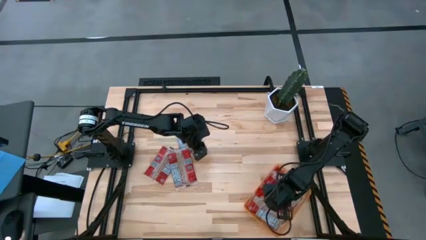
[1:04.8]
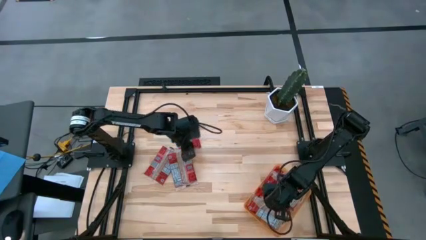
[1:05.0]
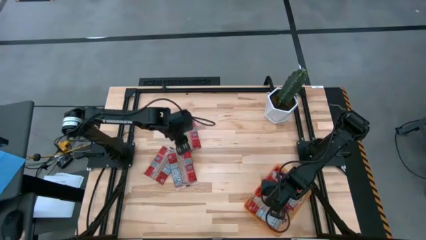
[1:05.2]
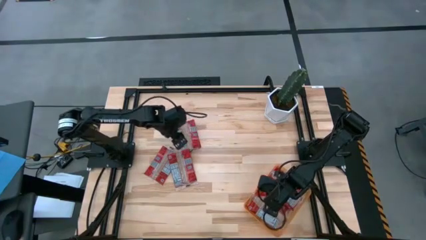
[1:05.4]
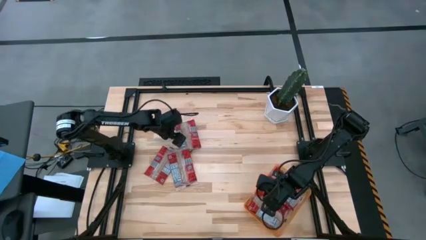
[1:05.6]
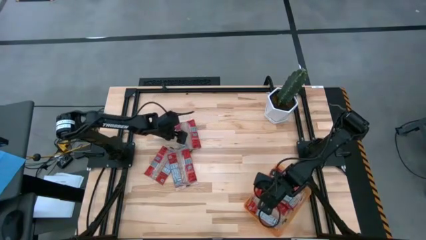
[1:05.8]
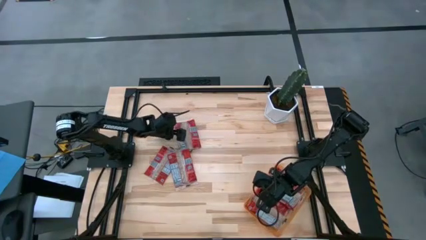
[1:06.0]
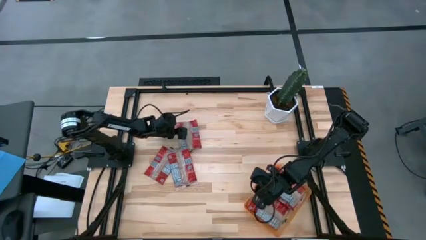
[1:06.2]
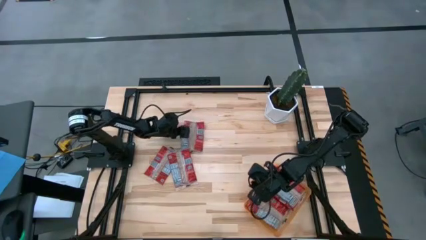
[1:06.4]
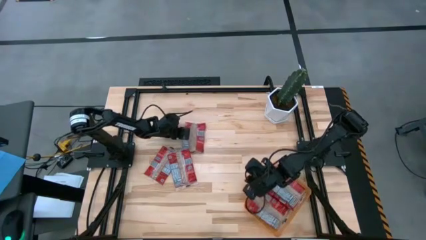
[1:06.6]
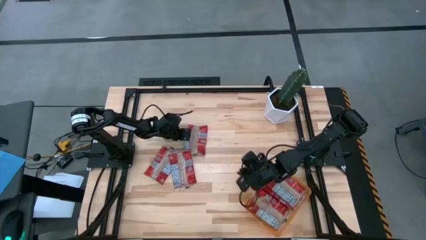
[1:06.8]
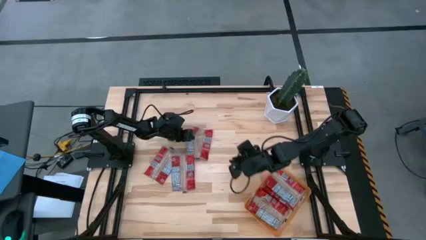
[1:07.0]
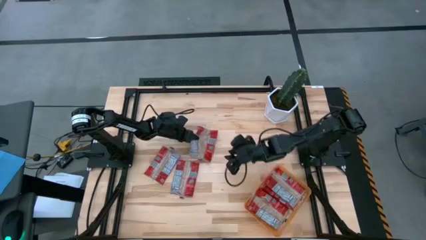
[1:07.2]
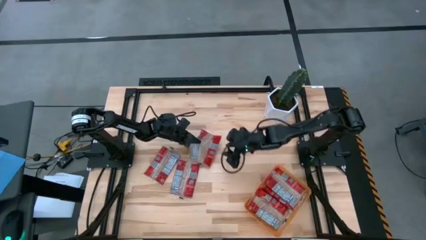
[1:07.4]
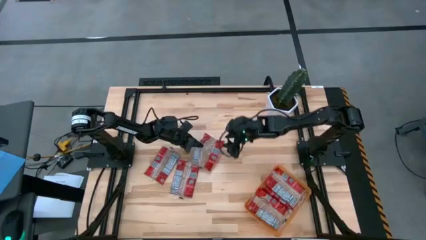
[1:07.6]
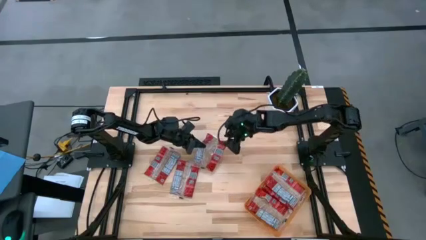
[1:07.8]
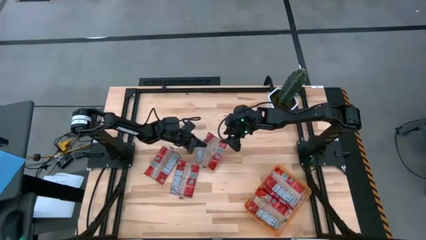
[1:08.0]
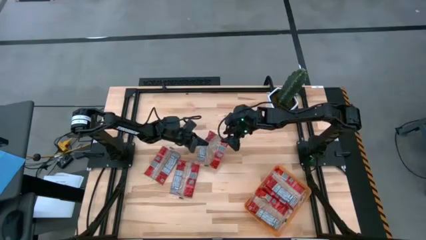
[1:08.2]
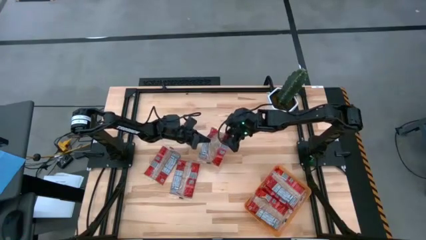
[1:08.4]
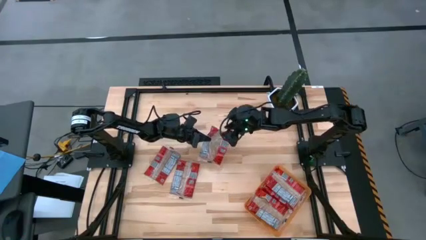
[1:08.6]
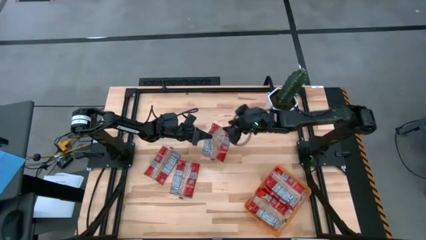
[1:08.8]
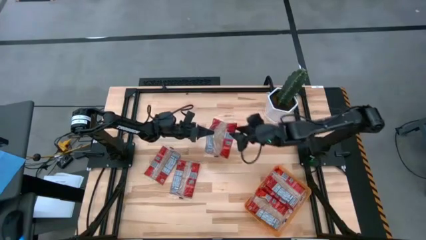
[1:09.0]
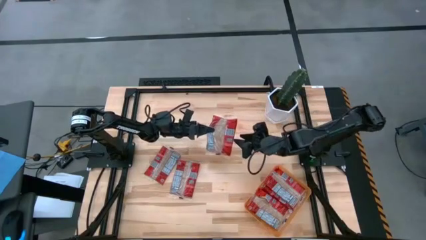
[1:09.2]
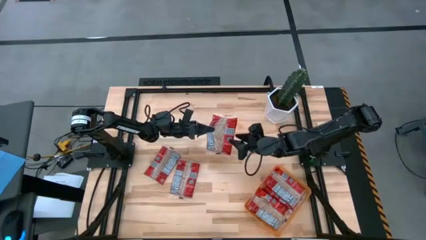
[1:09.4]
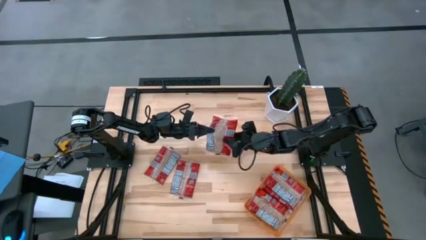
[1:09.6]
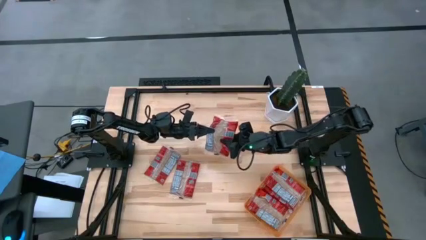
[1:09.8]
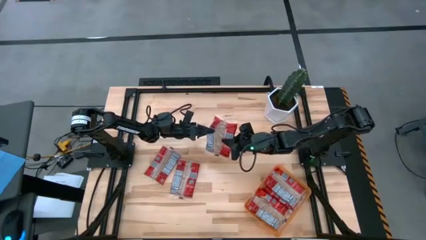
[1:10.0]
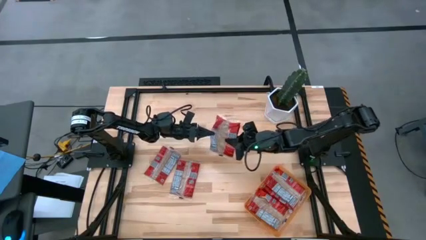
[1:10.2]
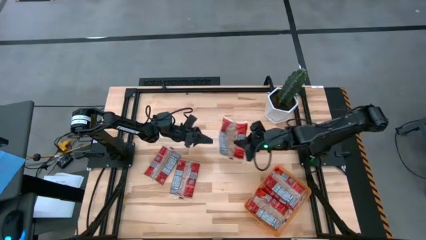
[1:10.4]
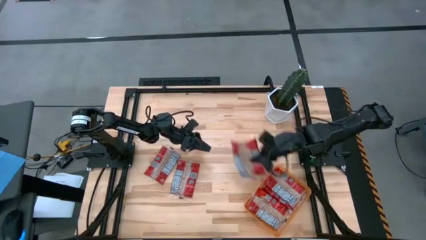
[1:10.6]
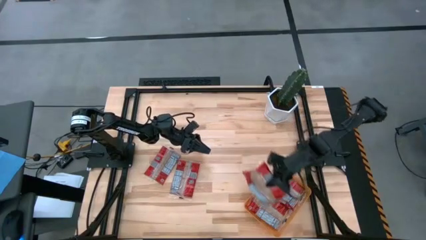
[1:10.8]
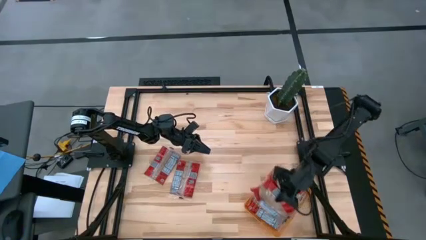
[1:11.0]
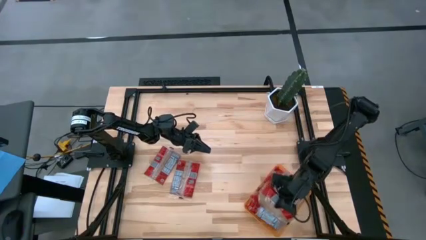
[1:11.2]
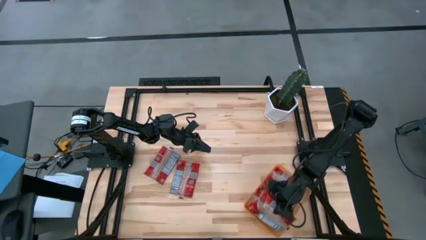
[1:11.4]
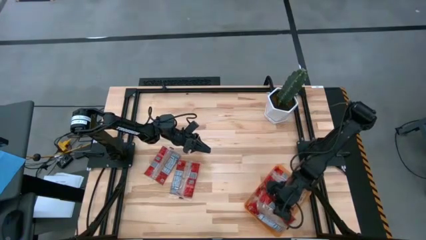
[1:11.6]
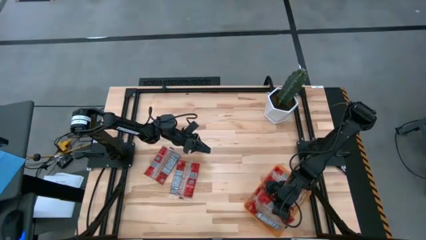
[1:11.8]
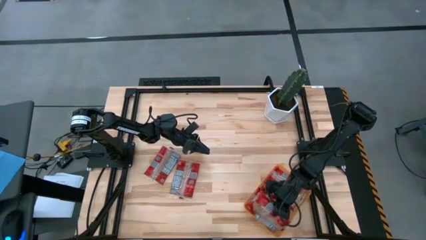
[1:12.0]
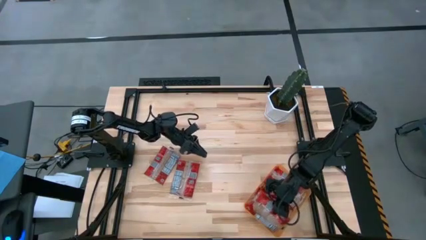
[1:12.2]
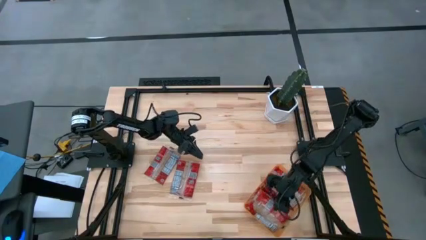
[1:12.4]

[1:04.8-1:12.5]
Task: Sort popcorn bags into baskets
Put the red popcorn bag into the orange bin

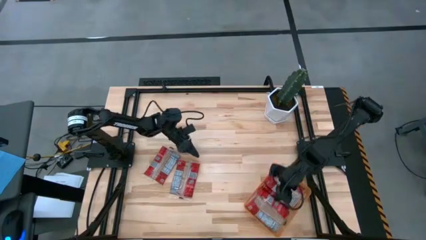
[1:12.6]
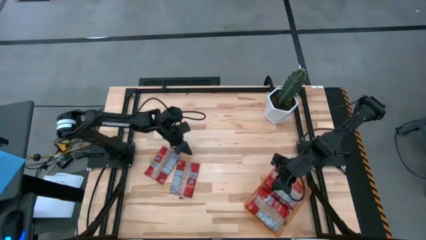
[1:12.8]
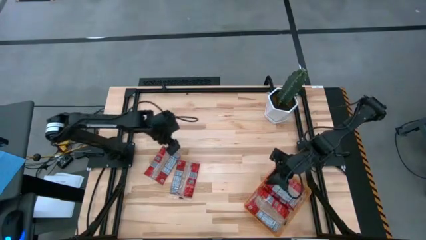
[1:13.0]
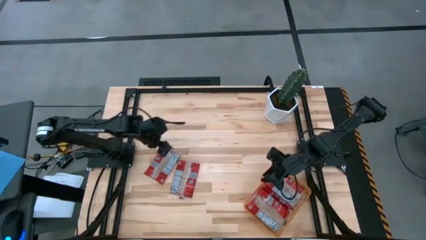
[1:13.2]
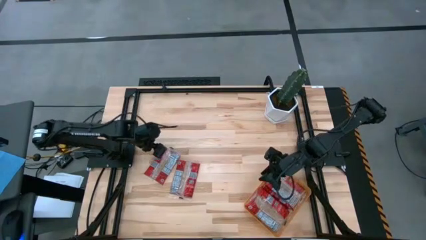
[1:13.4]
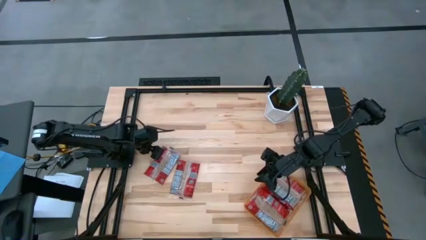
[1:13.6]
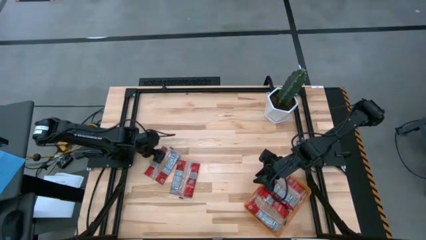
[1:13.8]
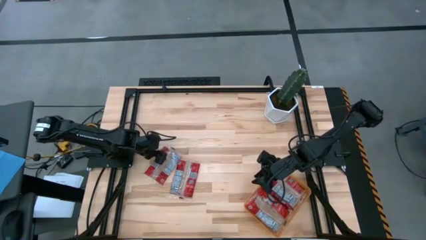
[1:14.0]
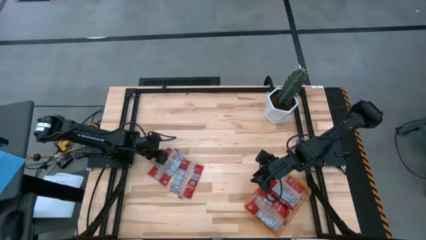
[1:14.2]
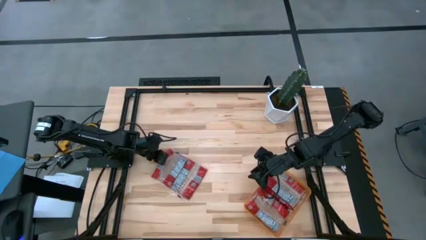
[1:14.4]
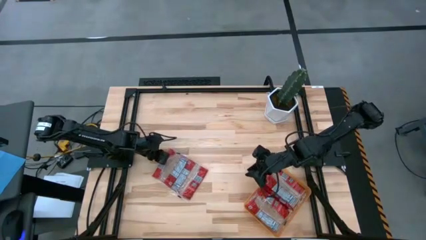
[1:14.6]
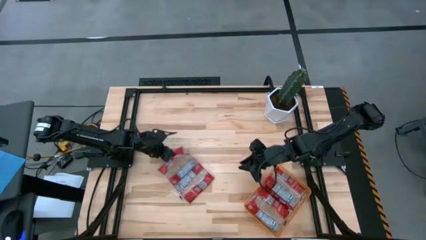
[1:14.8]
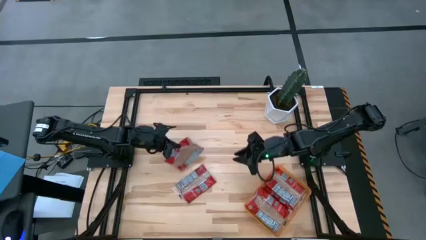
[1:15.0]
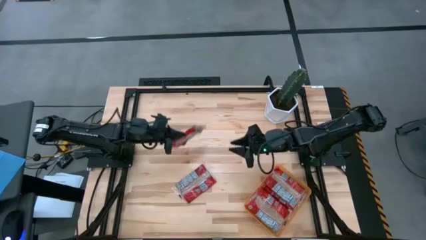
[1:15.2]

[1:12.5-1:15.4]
Put the red popcorn bag into the orange bin

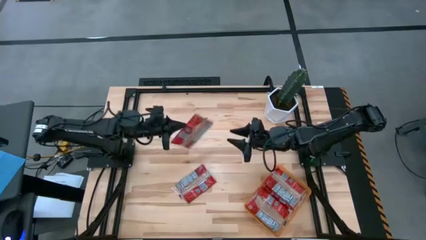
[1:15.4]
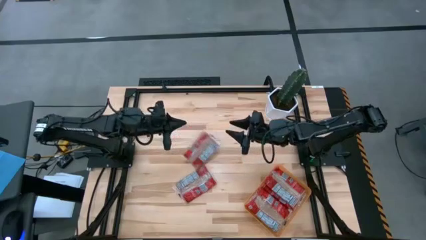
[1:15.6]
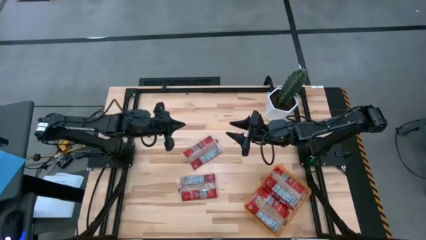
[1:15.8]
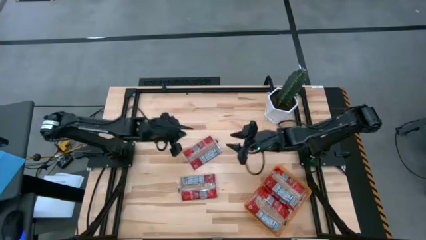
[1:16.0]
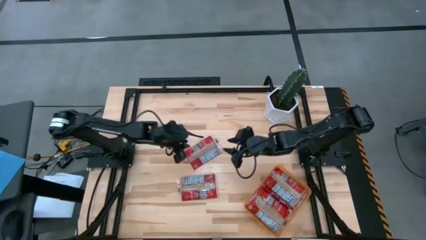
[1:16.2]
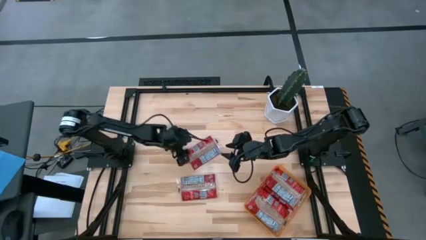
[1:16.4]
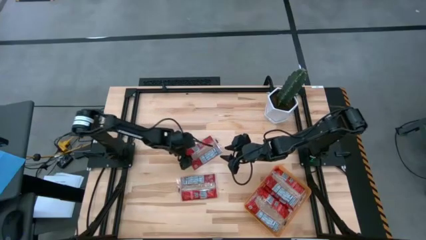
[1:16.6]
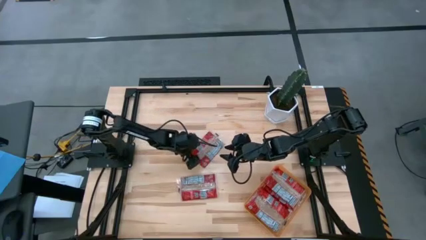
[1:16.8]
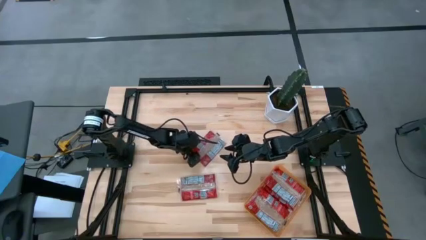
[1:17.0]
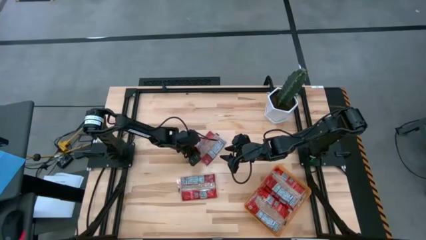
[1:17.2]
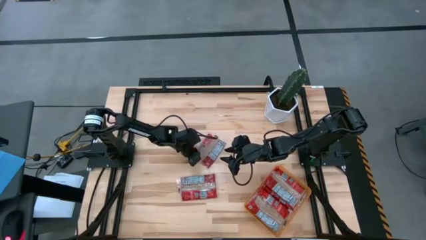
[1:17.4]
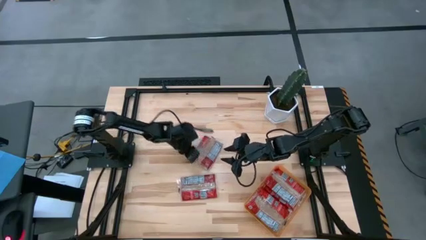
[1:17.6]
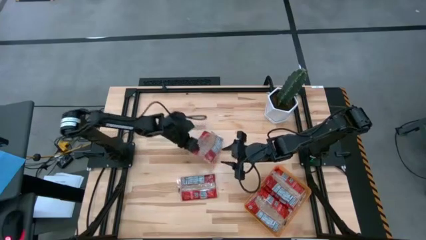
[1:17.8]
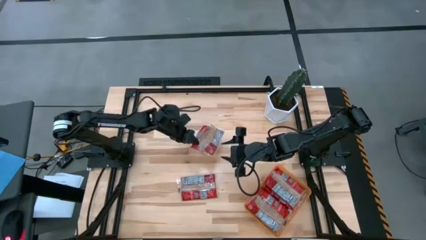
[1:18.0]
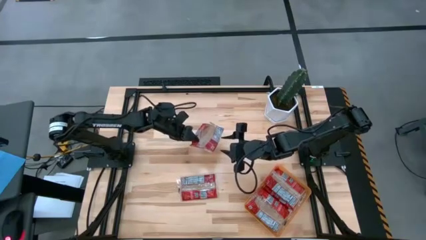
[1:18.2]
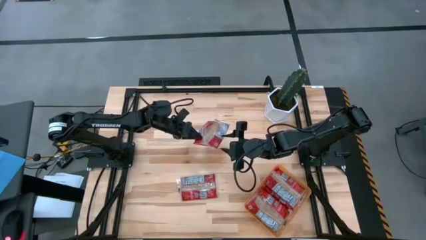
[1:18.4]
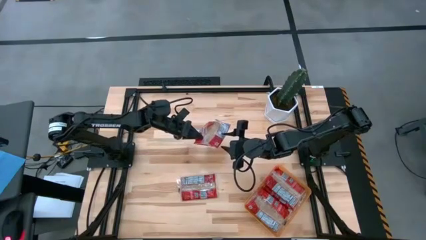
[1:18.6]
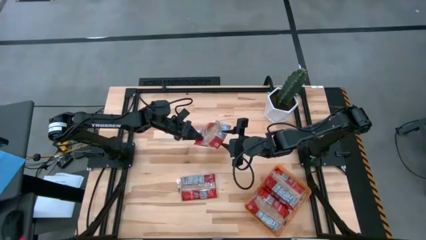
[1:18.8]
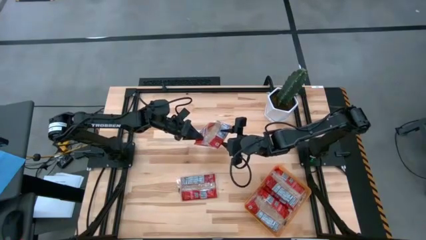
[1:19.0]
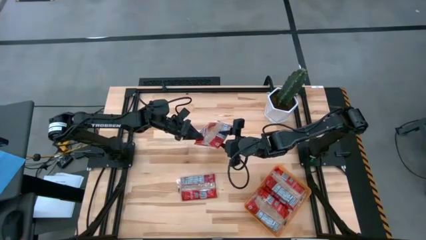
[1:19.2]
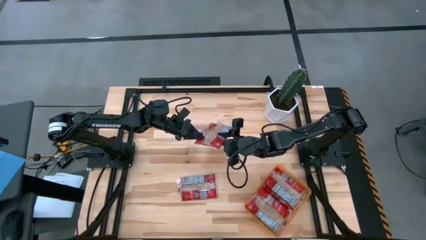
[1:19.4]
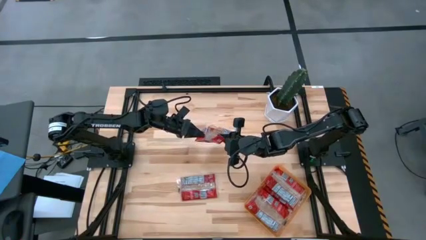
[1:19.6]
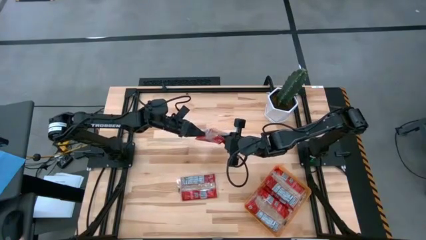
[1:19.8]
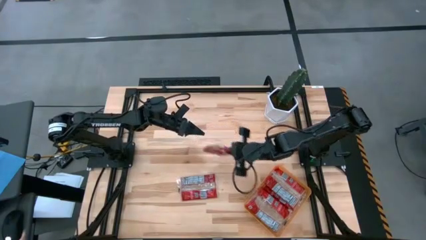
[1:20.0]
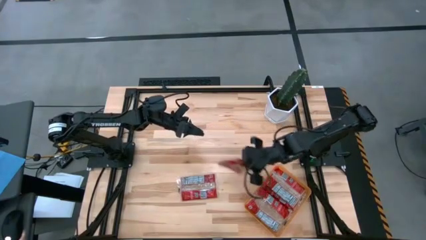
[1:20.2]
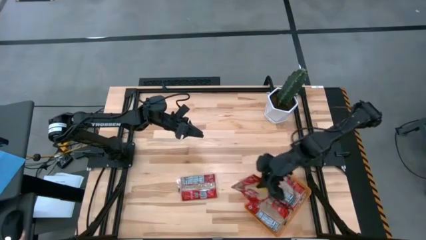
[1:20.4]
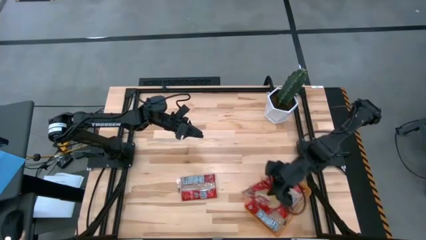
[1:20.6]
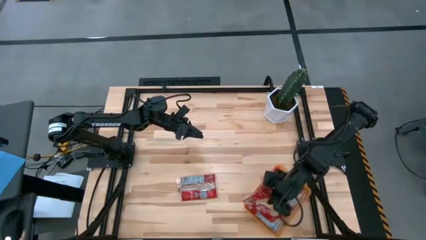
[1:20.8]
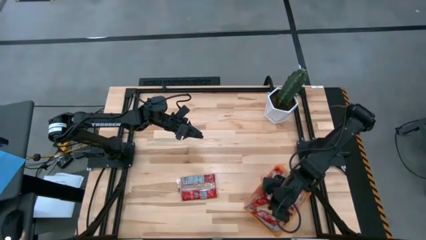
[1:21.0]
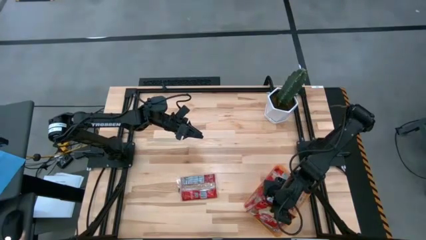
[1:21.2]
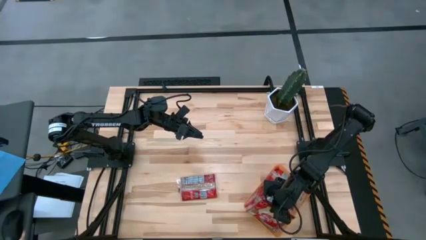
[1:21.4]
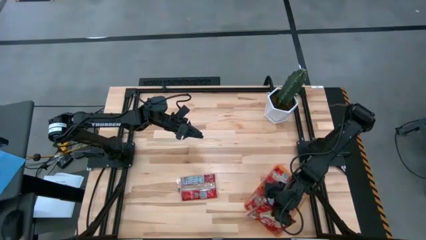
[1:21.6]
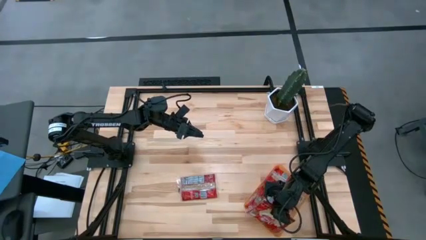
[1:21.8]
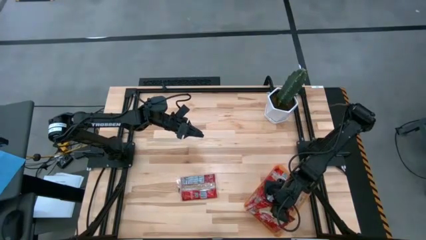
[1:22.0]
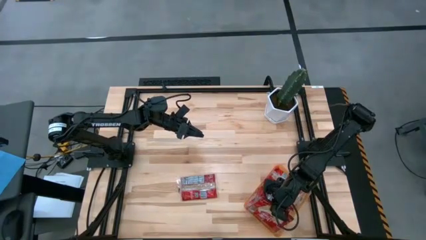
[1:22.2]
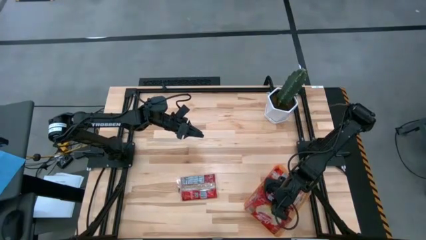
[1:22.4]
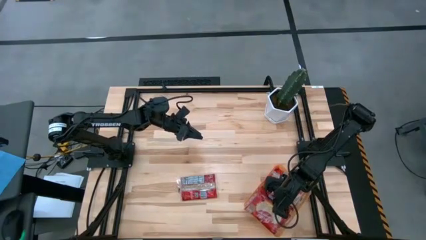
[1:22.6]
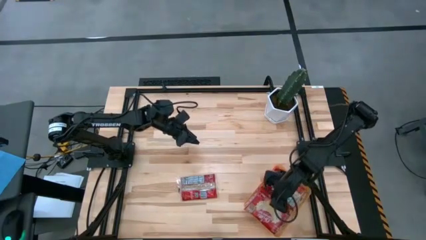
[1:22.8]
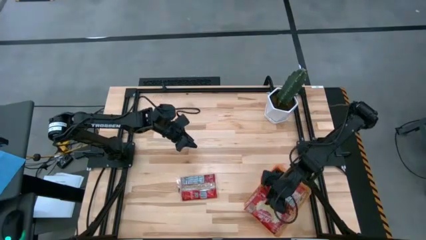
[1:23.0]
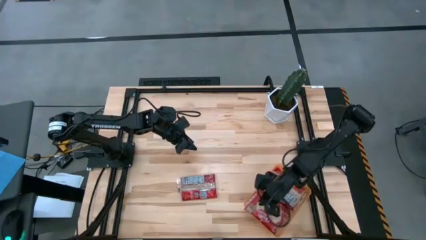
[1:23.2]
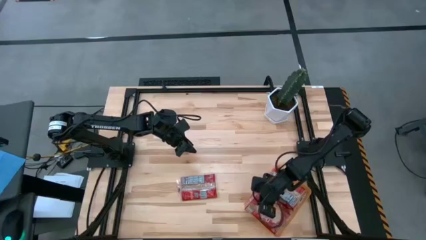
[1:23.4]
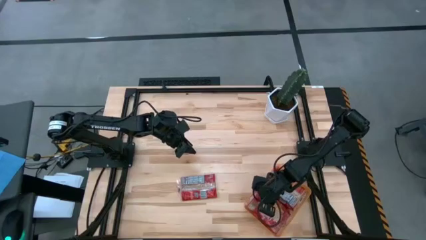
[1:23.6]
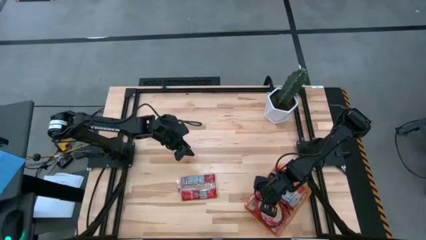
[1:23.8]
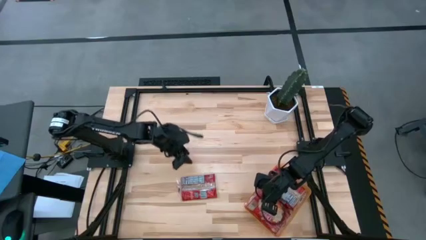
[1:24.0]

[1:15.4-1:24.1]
Put the red popcorn bag into the orange bin
